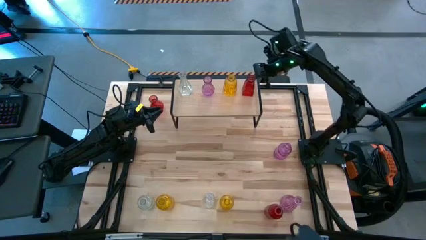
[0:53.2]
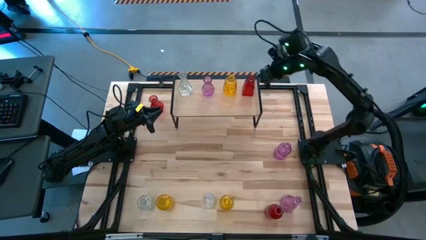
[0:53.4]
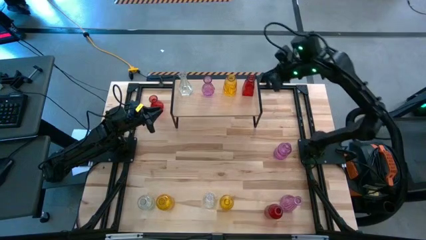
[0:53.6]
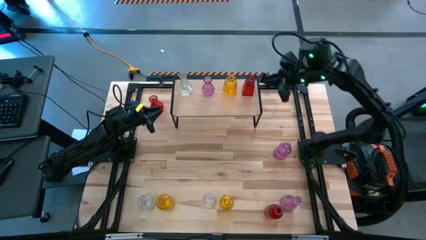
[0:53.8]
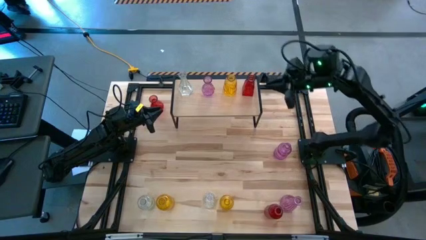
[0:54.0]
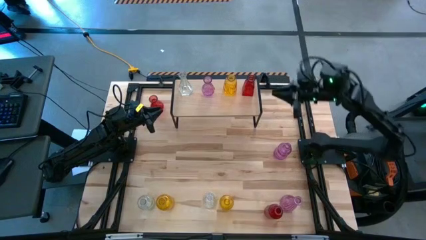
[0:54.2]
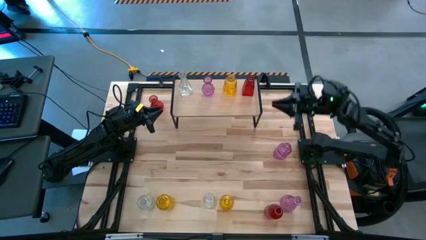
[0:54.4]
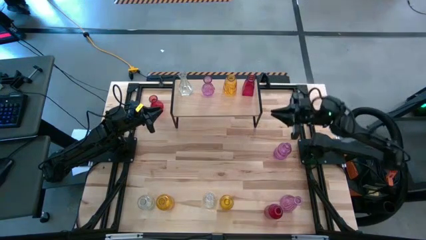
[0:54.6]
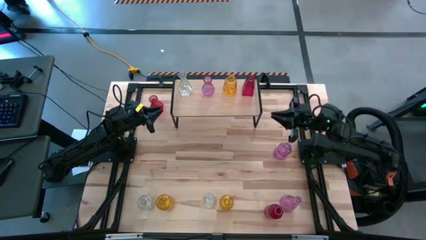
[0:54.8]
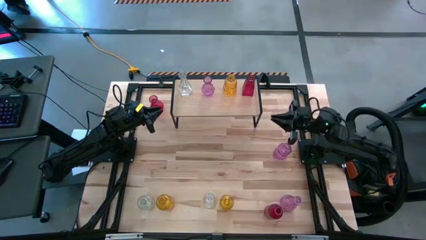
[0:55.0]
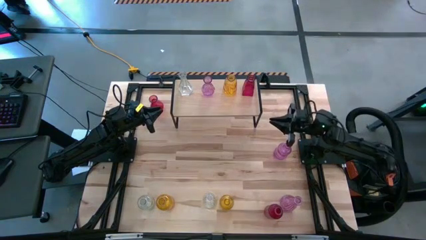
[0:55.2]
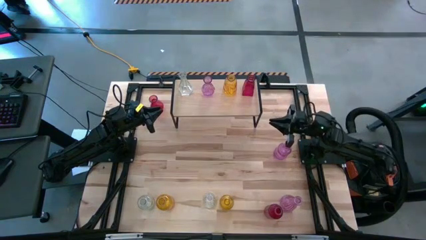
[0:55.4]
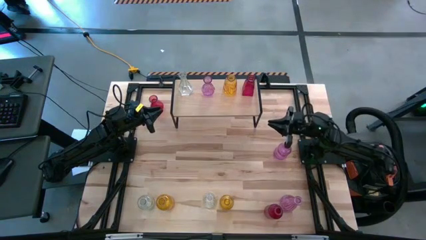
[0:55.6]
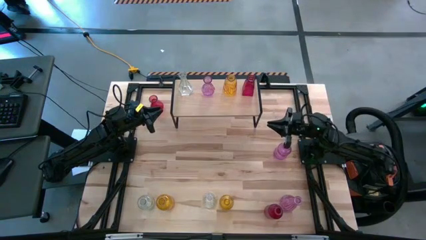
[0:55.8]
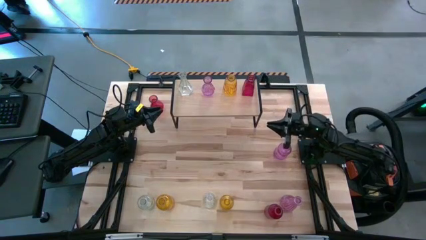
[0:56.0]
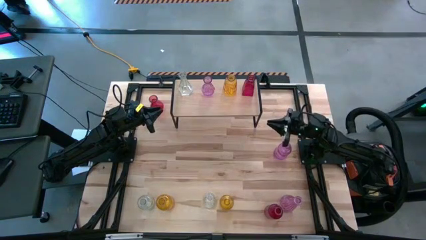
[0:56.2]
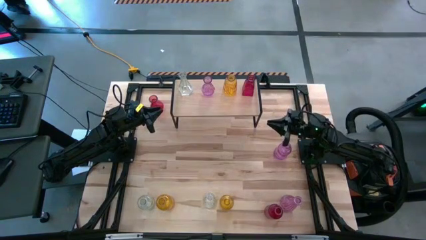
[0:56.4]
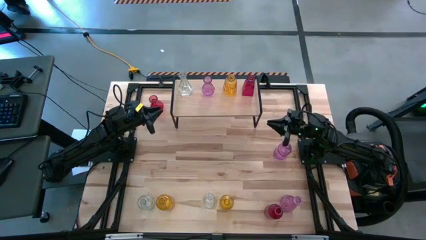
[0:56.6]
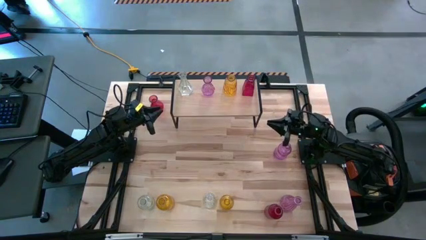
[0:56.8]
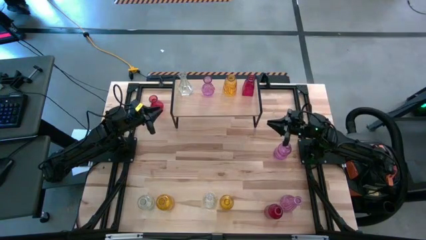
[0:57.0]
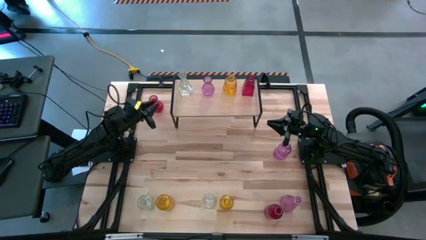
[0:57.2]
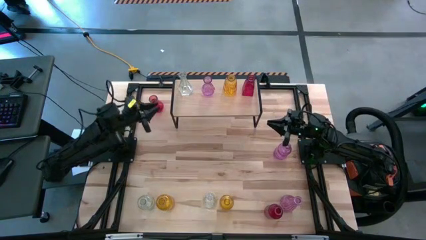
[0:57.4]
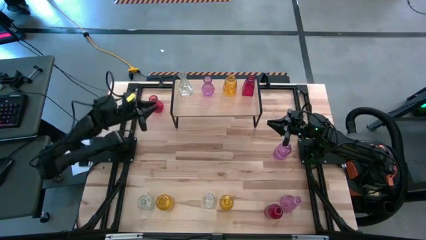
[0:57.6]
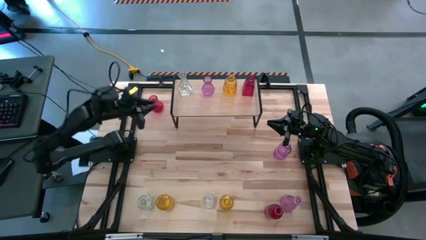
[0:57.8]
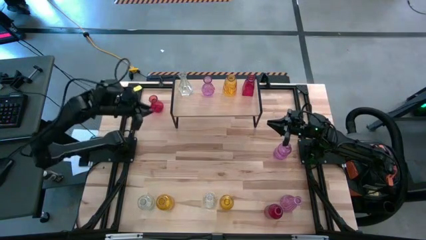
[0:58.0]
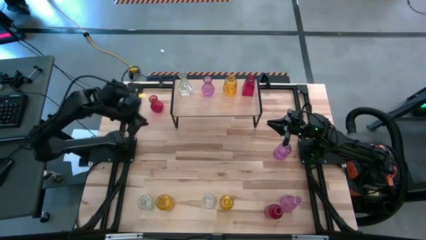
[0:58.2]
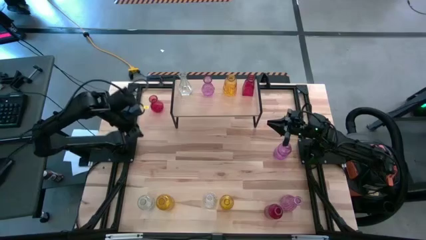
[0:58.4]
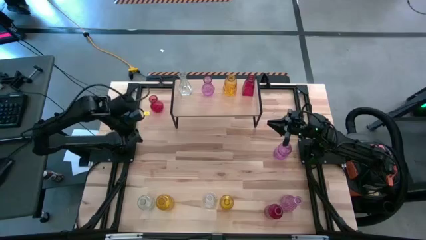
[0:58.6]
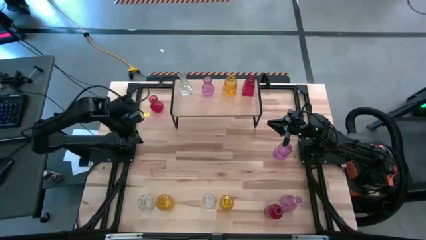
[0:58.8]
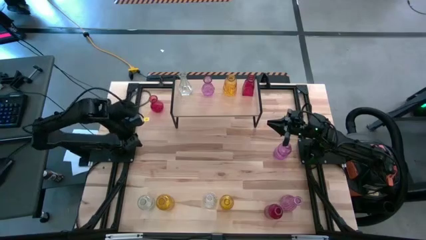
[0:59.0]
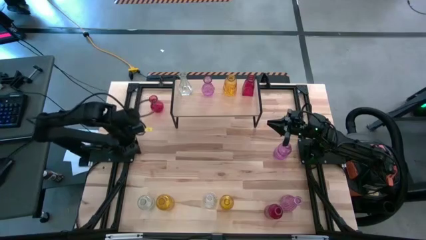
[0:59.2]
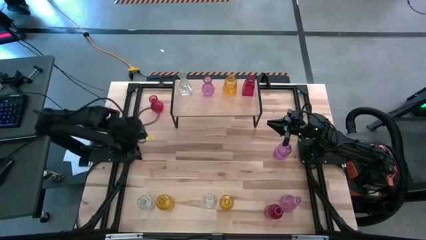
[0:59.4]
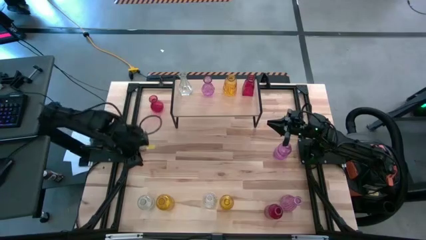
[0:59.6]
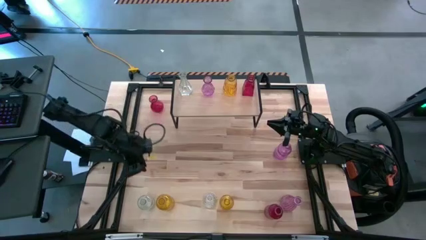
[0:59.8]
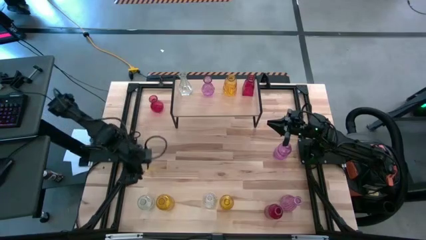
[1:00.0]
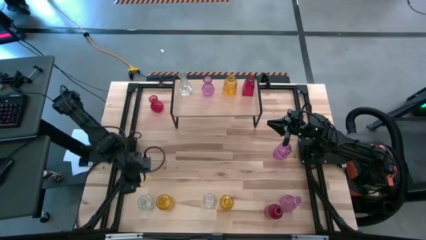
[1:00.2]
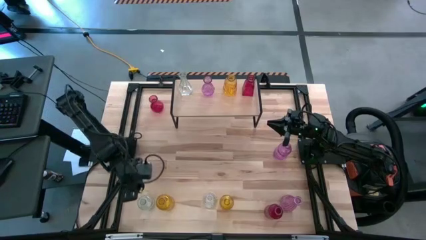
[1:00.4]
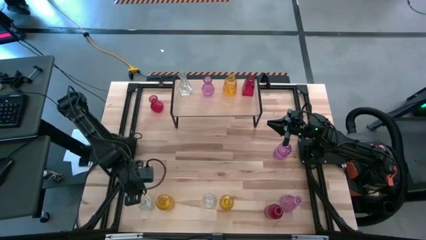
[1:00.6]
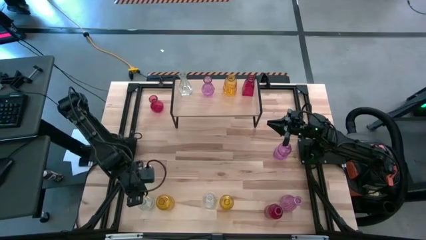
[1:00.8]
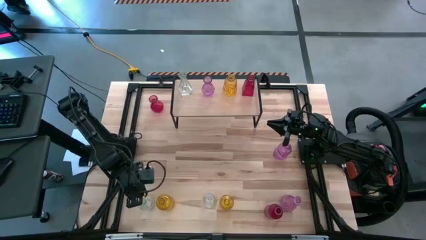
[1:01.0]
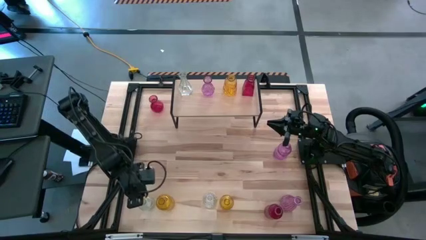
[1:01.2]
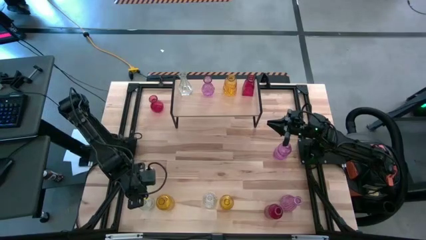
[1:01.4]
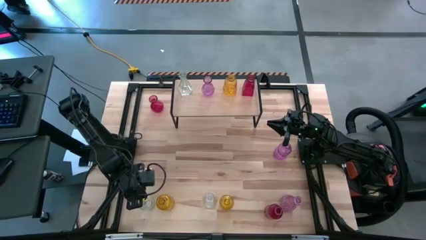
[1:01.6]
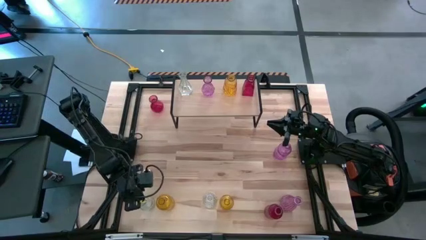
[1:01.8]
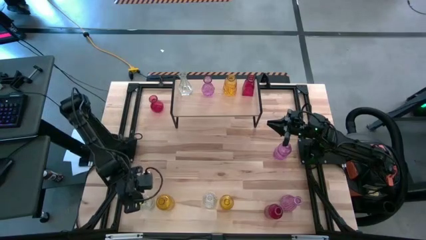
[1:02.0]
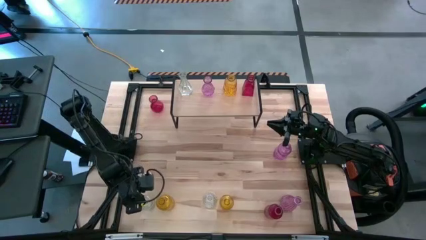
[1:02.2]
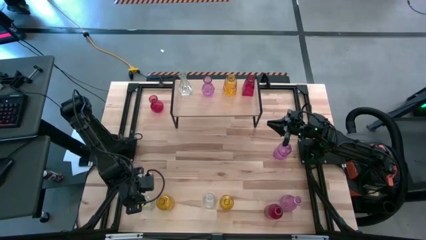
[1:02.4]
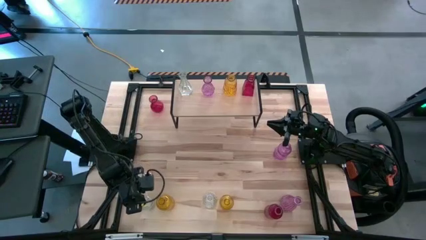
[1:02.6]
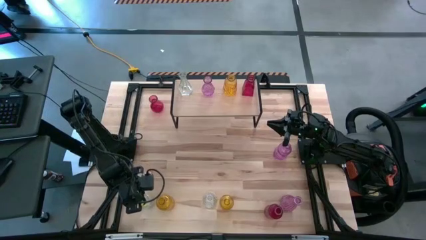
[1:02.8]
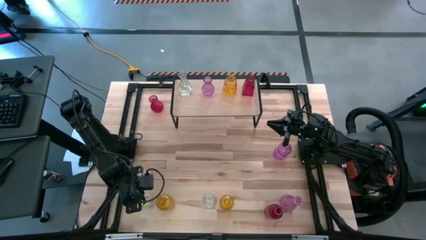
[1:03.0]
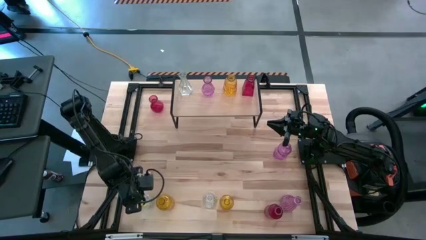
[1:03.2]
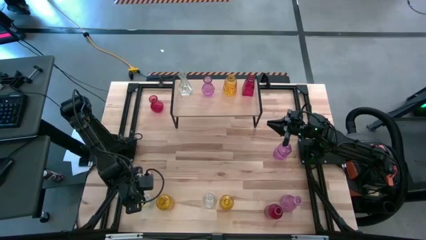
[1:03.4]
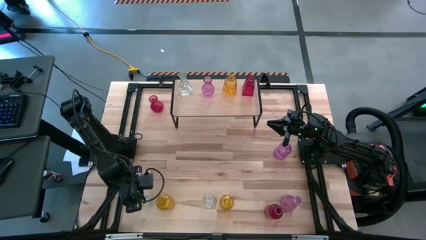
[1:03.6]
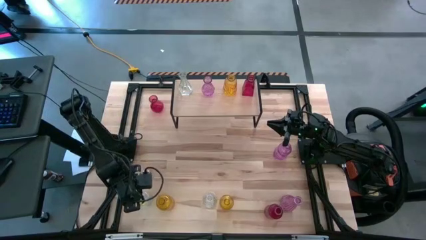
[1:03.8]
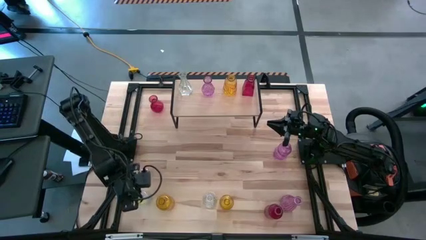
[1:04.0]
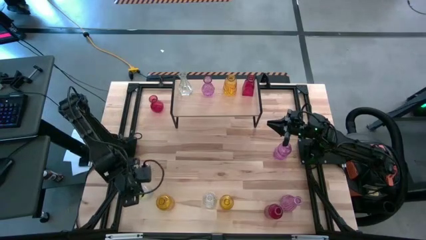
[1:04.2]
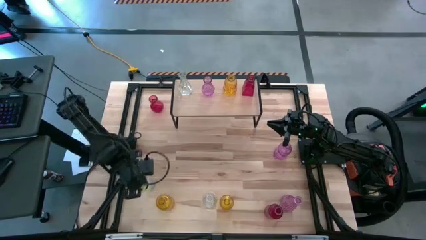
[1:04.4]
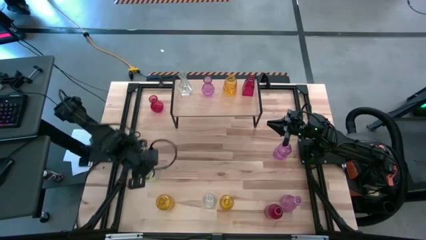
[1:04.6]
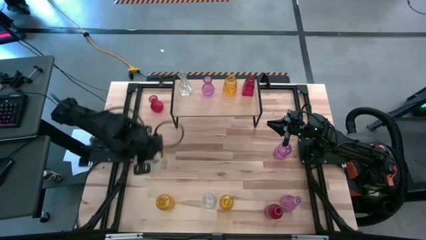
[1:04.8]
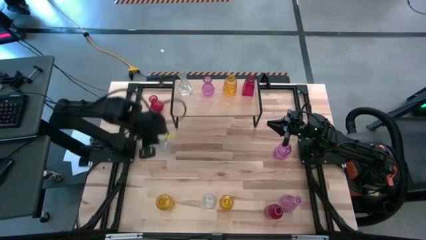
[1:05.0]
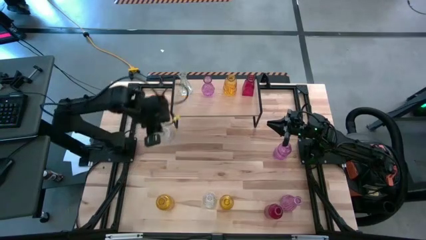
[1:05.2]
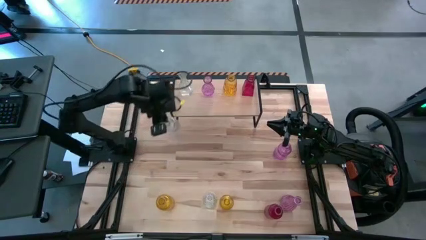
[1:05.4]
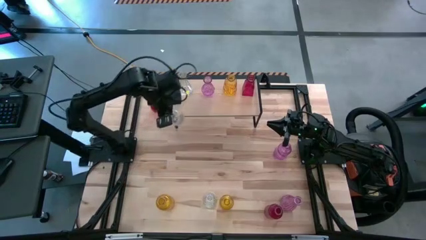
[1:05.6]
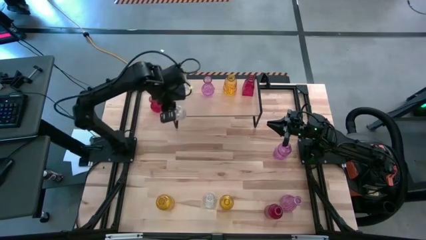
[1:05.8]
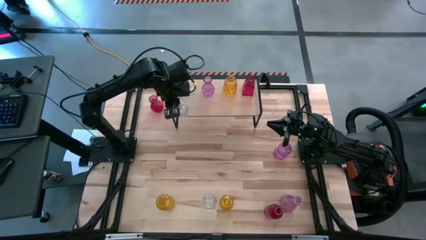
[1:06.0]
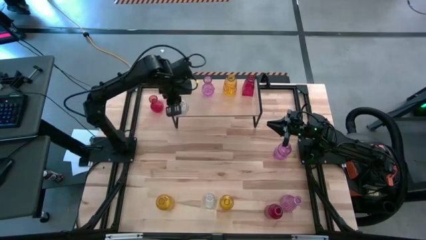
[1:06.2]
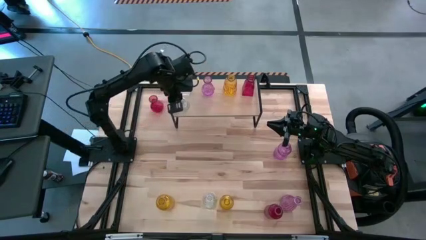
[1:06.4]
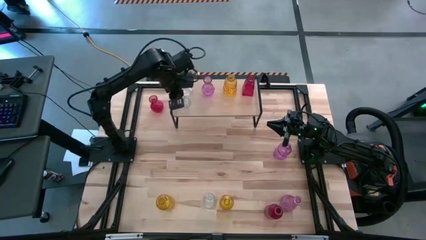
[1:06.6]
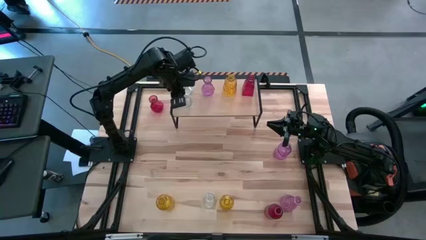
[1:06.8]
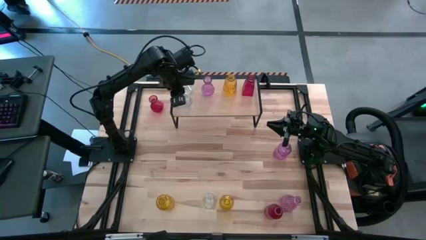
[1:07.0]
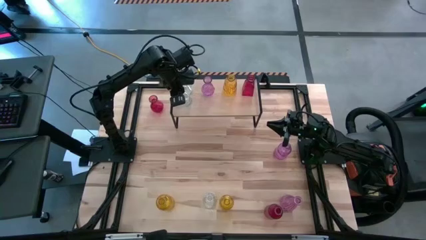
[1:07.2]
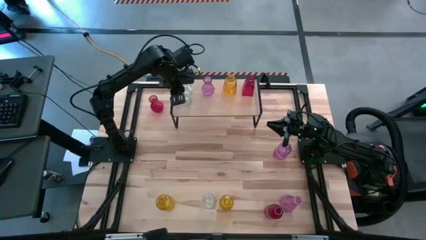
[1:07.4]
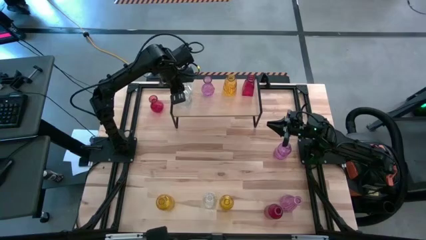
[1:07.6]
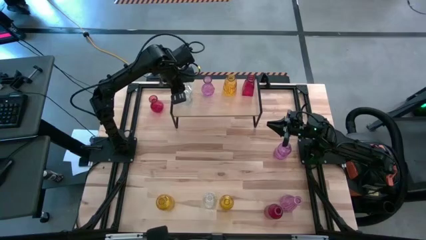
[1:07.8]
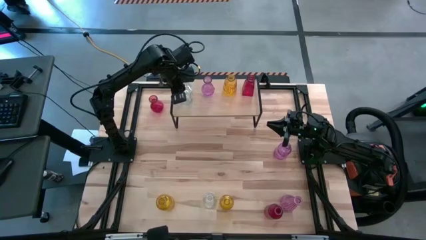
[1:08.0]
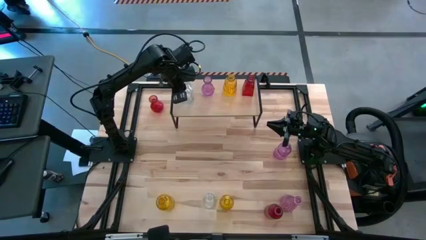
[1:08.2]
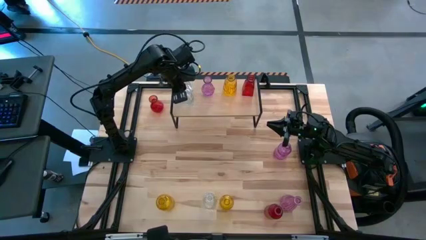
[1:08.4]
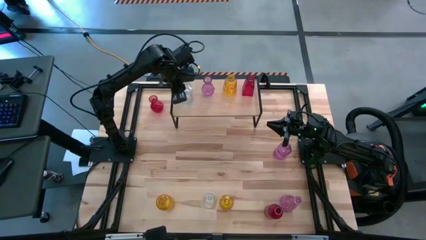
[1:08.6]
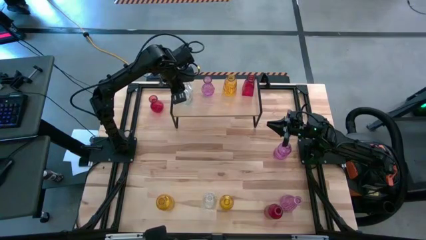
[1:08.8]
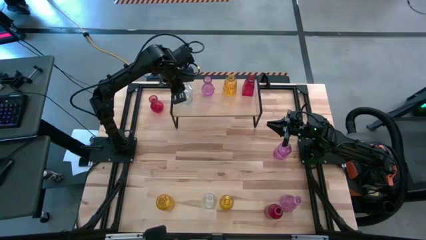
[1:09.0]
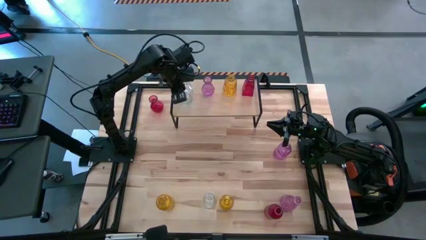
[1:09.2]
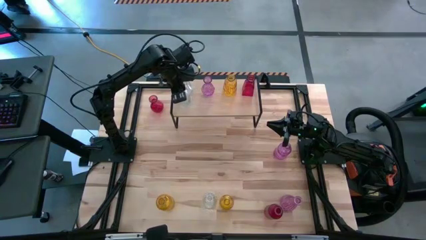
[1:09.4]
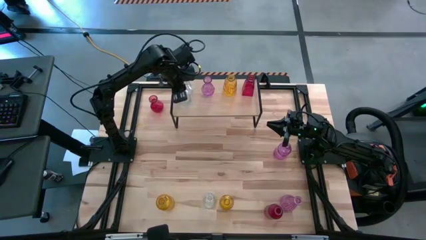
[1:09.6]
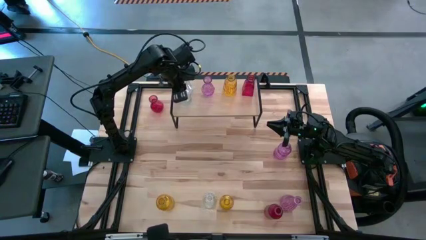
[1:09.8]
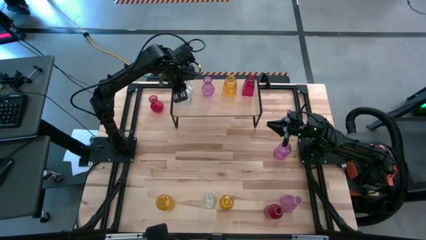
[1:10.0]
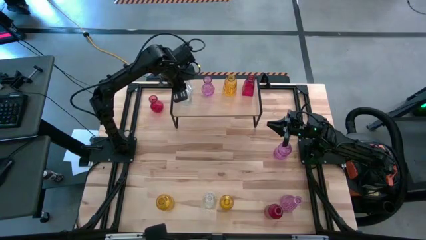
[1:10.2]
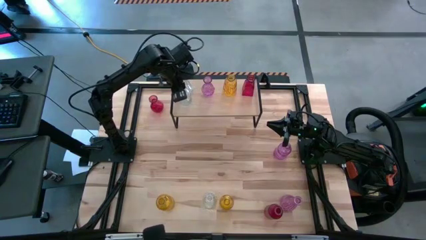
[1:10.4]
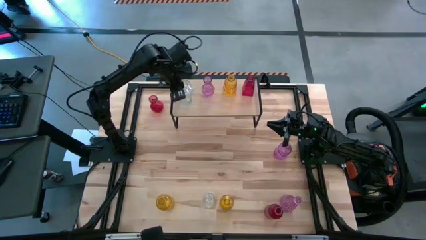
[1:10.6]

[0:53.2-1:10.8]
Task: sort vases onto shelf
Put the left transparent vase on the shelf aligned with the other transparent vase
